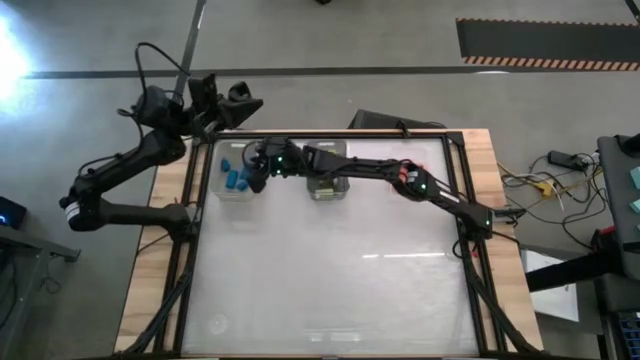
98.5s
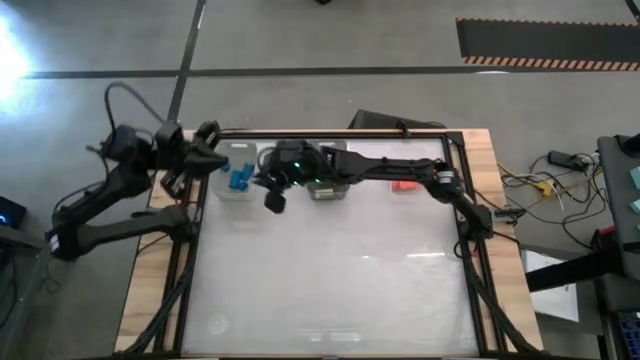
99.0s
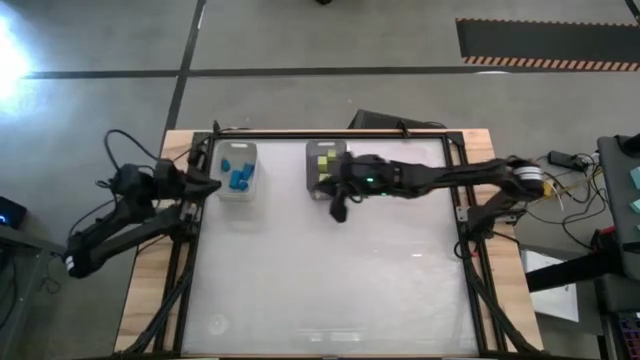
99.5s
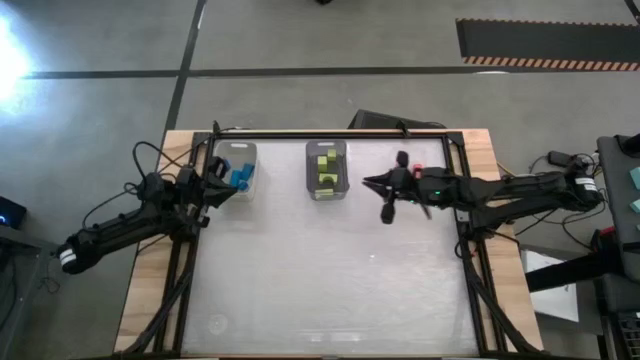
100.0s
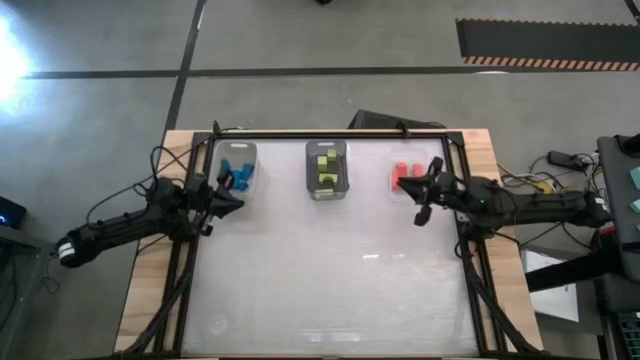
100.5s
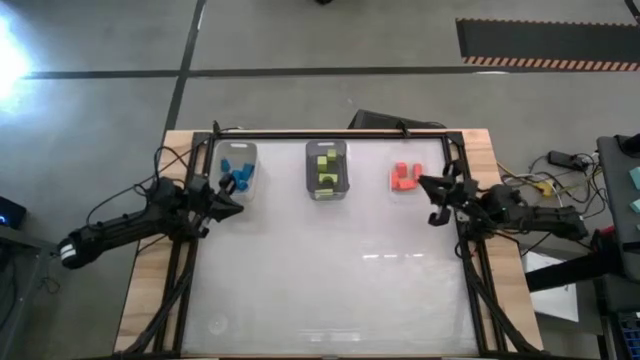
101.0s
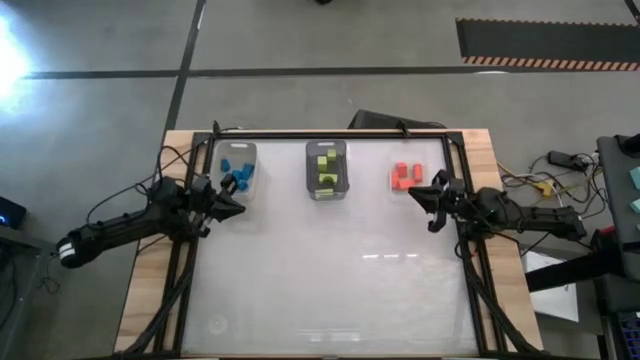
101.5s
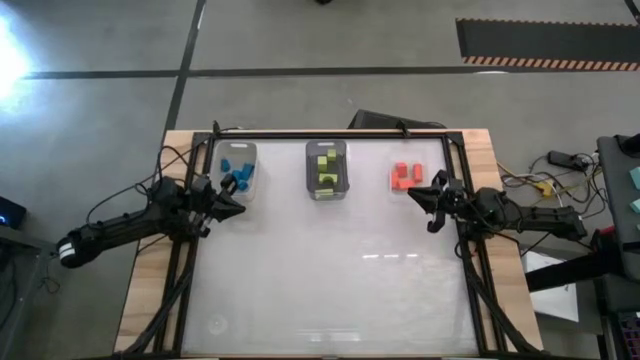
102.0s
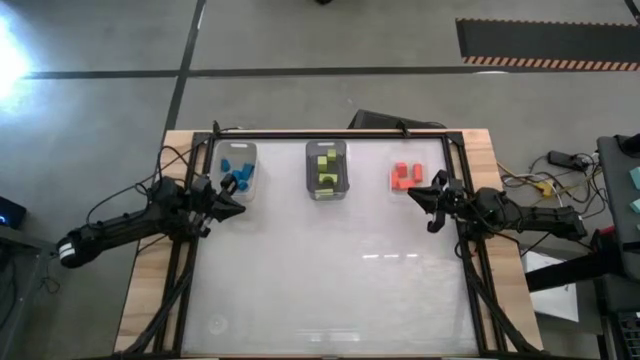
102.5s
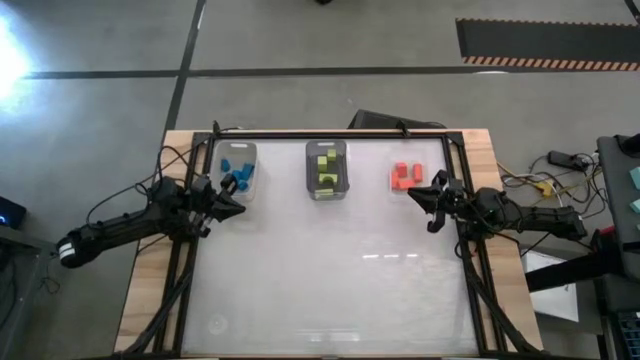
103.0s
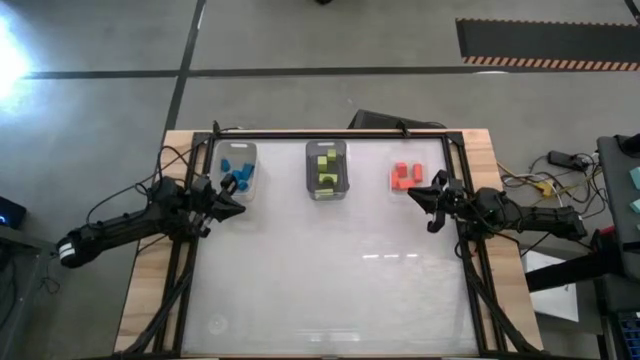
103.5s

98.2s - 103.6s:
Task: Sort & place blocks by color
Return to Home Position

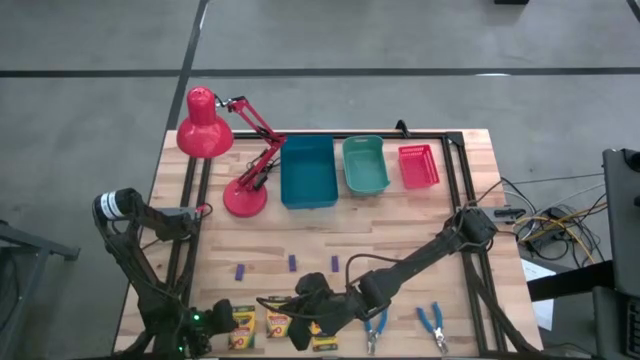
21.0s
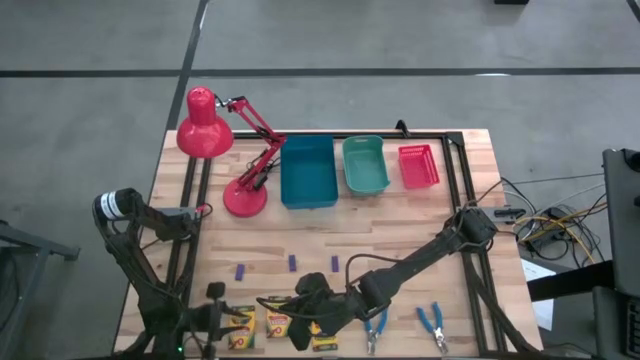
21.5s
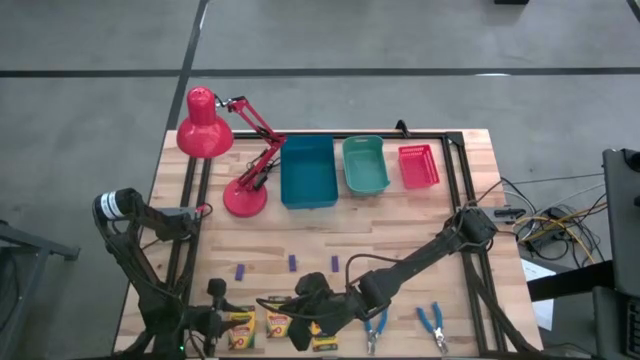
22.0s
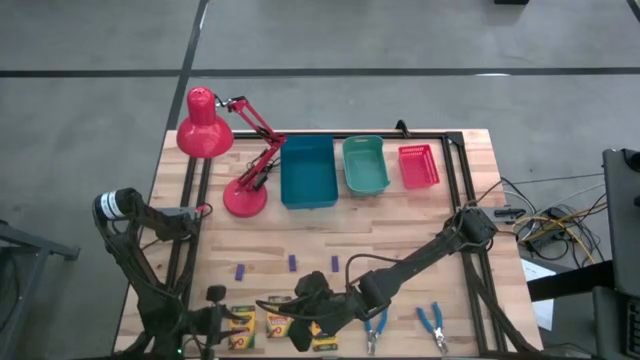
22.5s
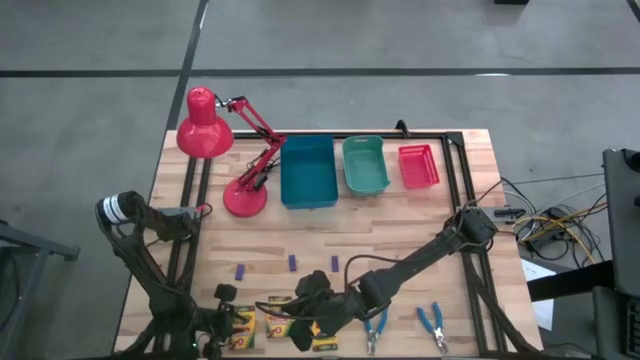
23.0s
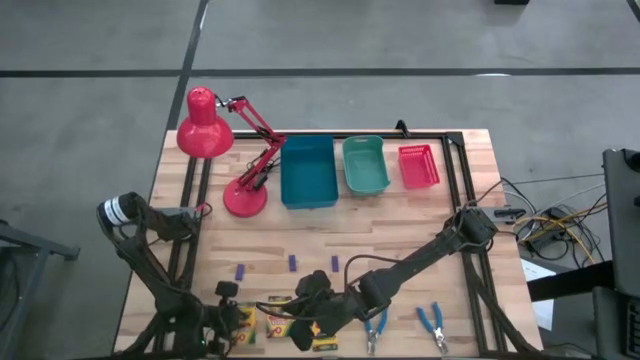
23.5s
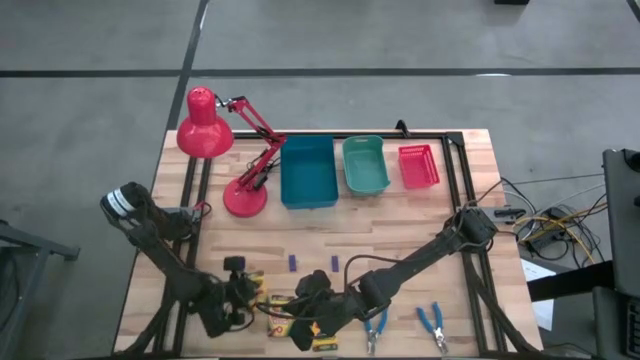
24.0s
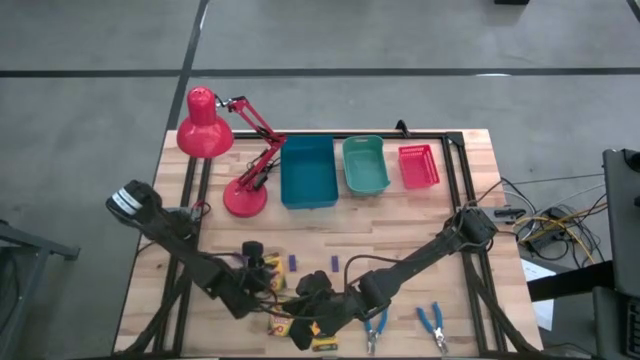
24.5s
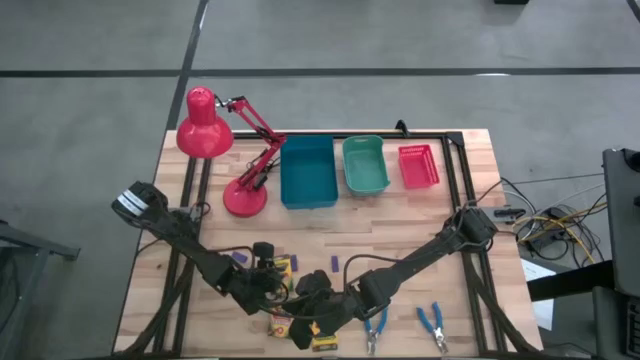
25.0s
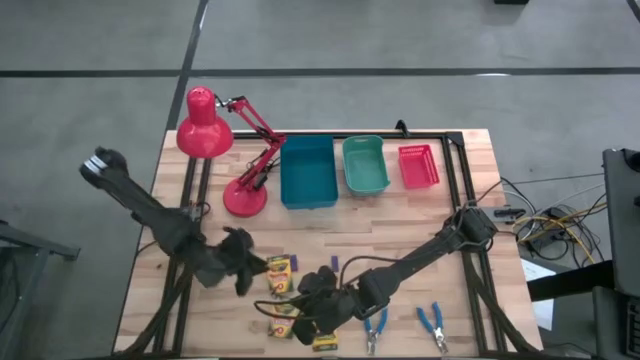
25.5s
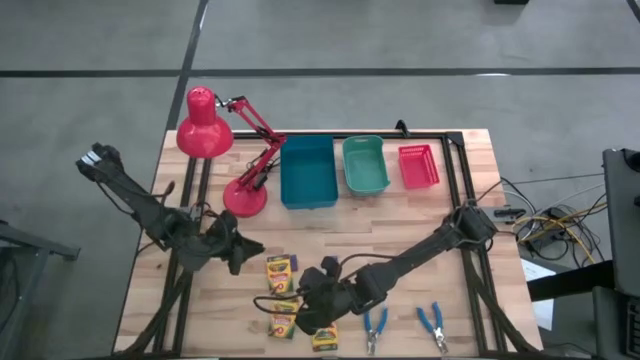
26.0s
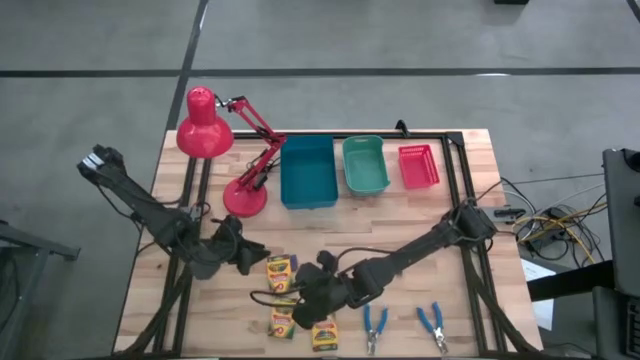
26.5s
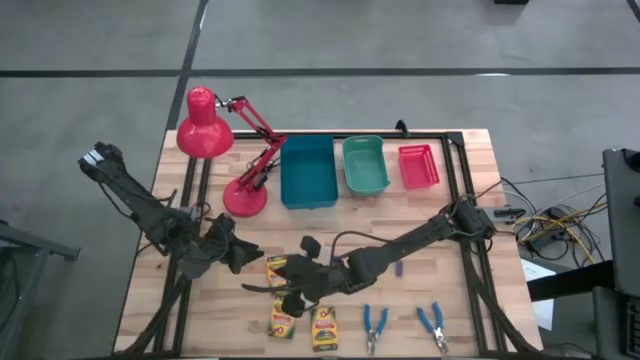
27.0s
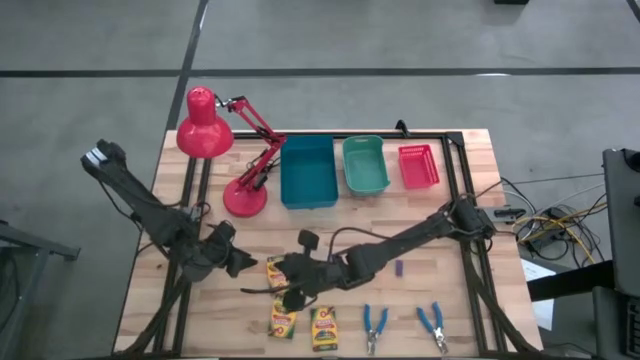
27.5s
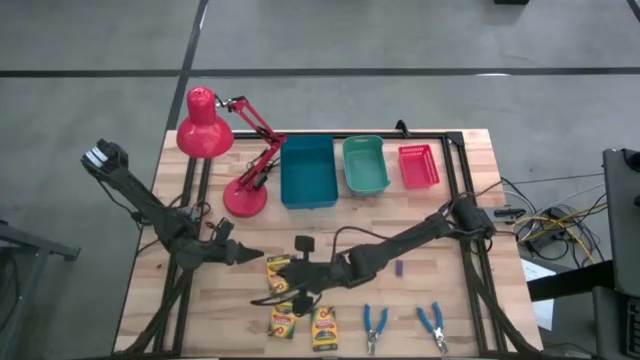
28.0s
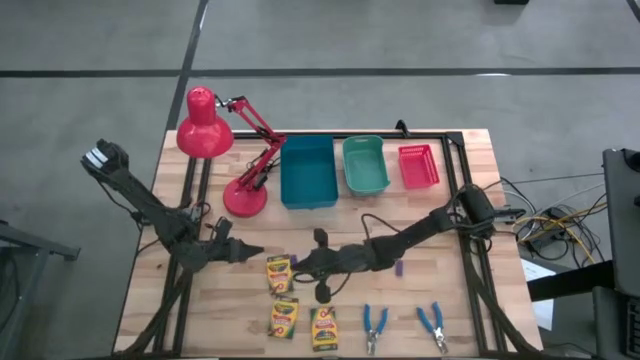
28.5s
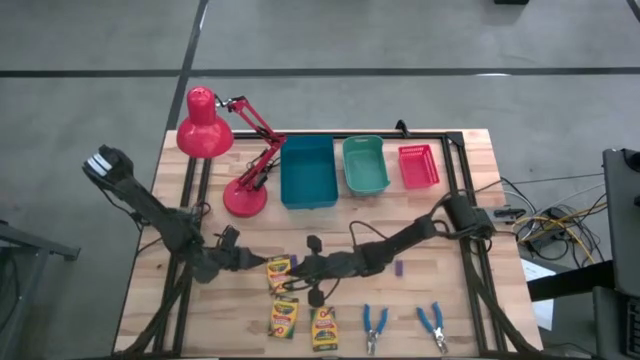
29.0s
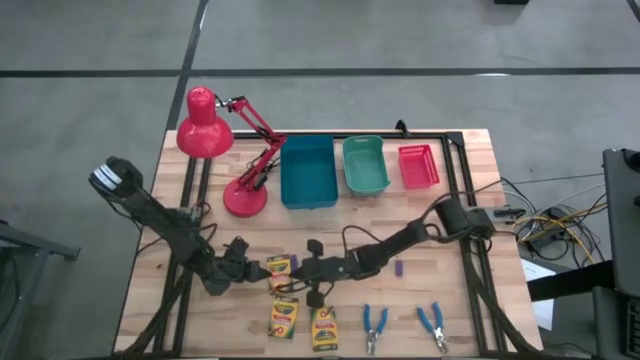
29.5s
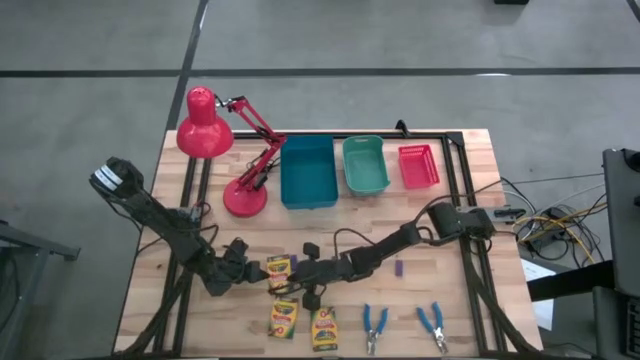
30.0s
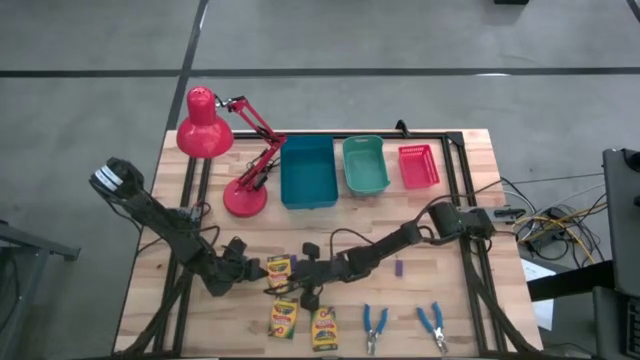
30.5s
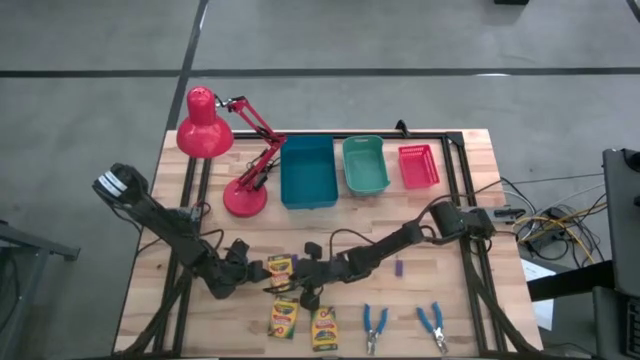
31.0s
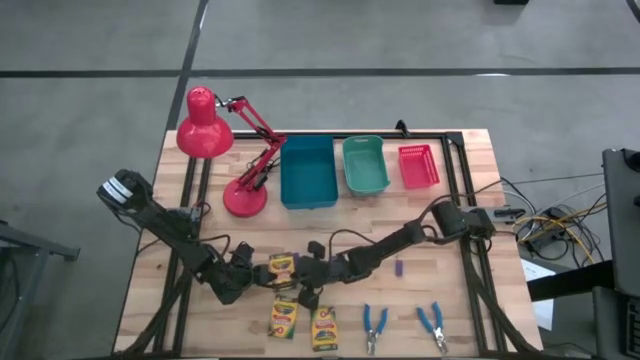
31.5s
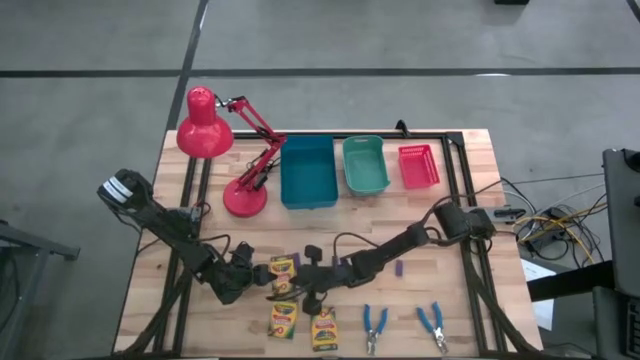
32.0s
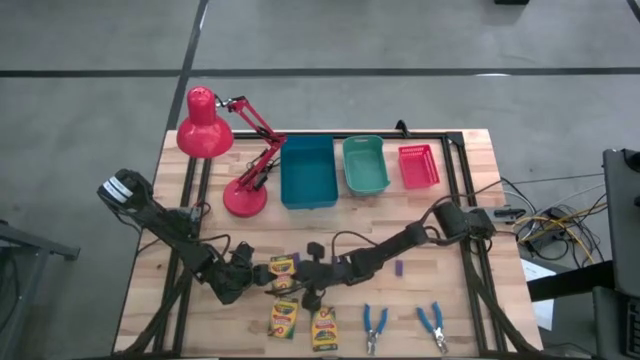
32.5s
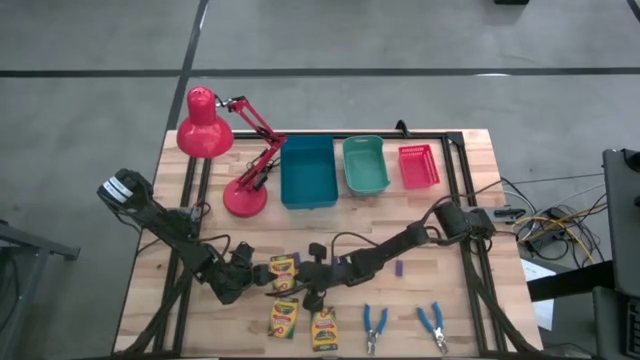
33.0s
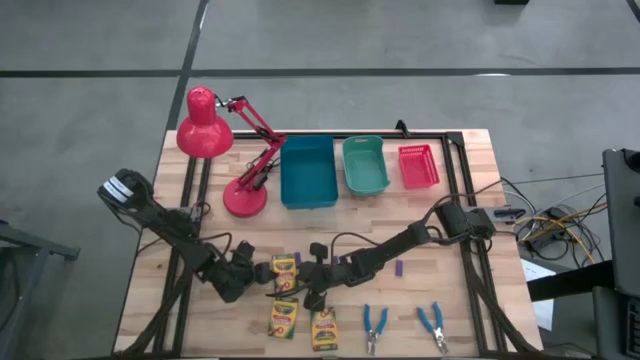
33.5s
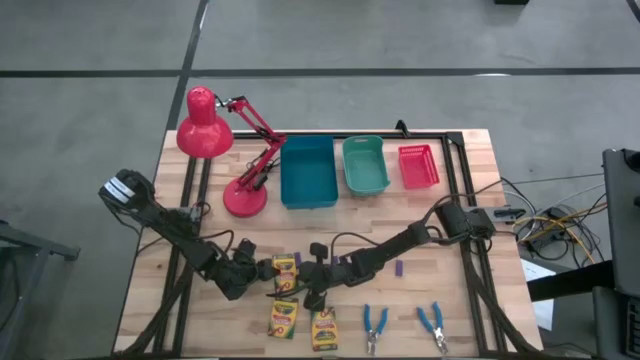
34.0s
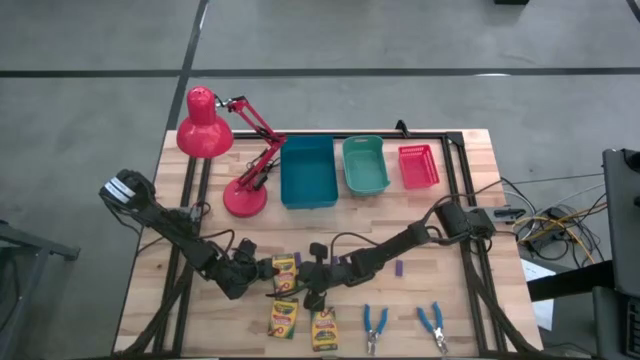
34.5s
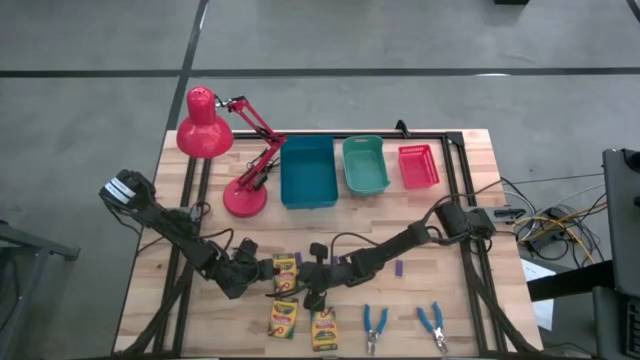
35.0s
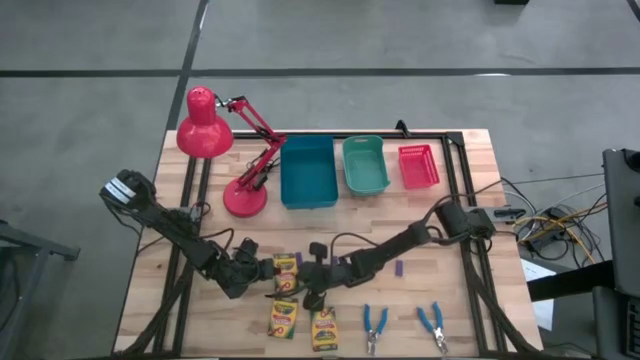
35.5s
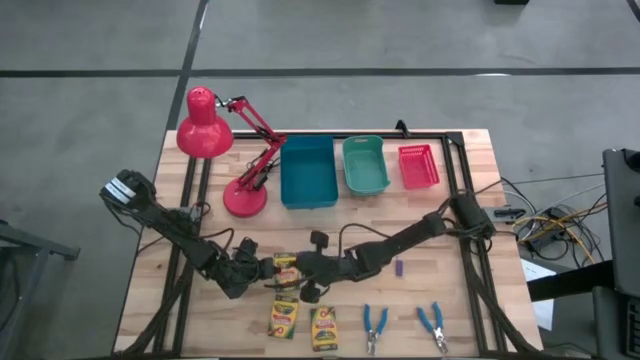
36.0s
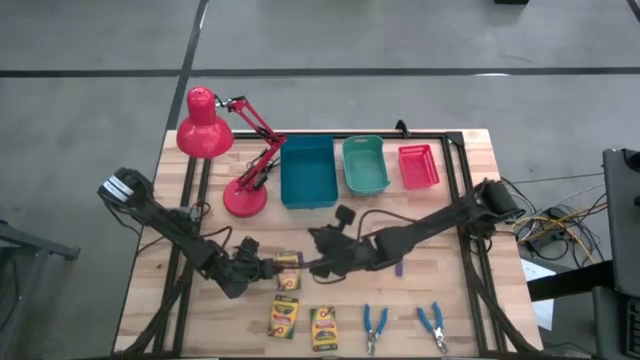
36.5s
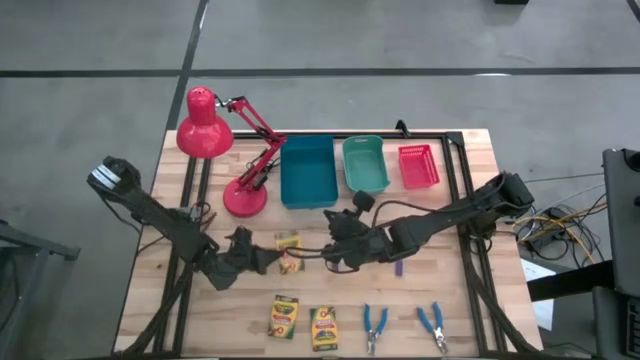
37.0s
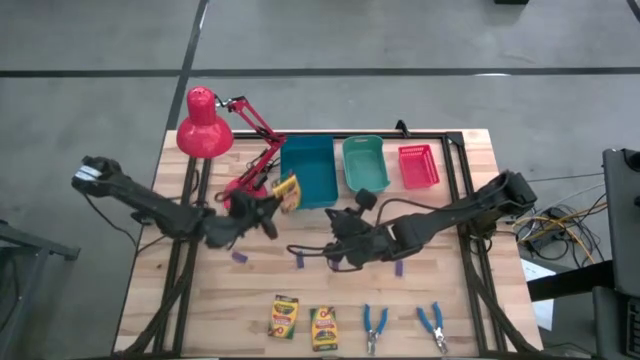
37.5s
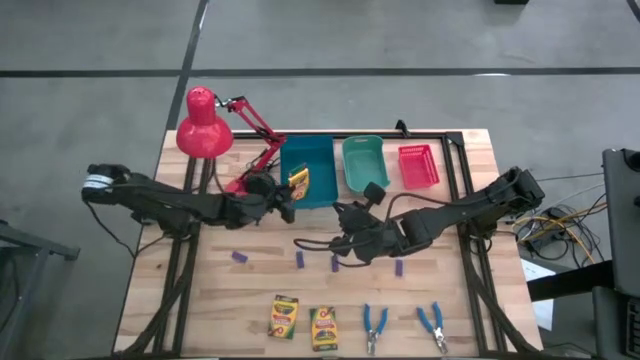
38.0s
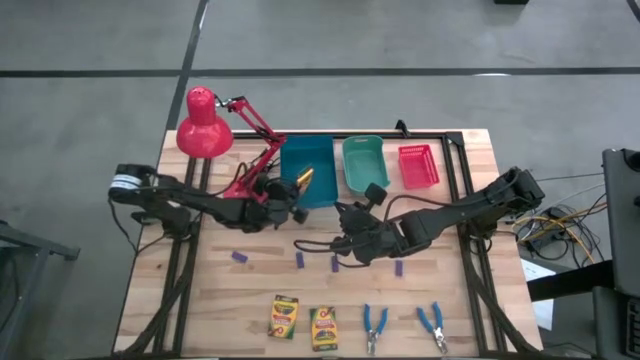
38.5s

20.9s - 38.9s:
Task: Pick & Place School Supplies
Put the crayon box into the blue bin
